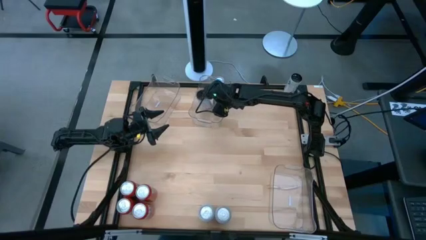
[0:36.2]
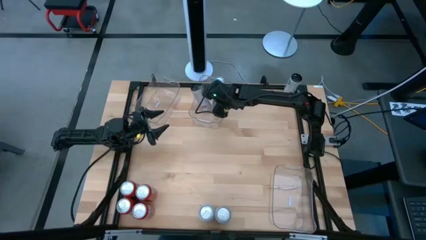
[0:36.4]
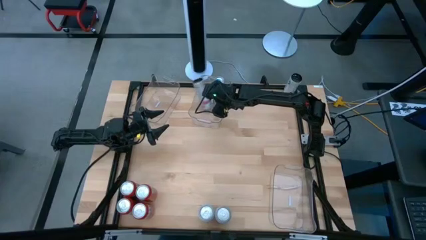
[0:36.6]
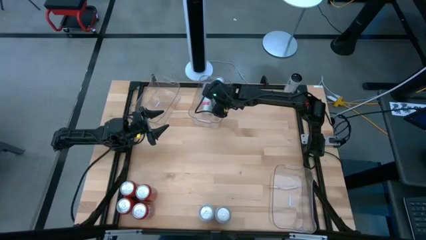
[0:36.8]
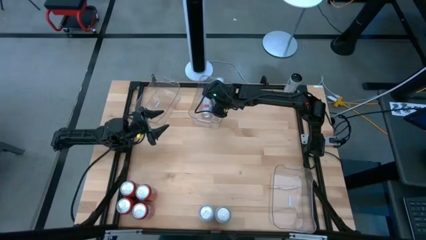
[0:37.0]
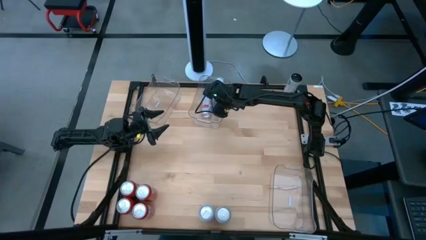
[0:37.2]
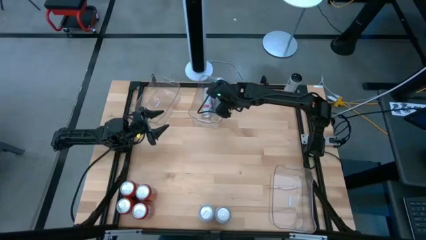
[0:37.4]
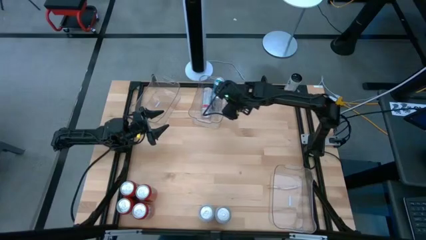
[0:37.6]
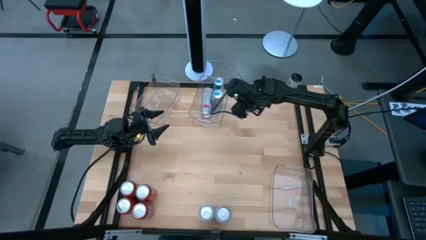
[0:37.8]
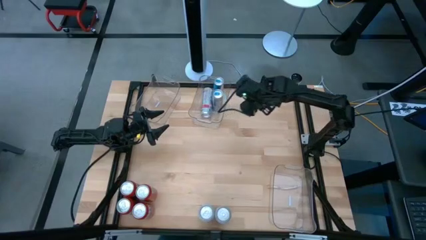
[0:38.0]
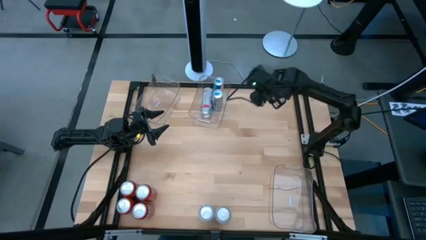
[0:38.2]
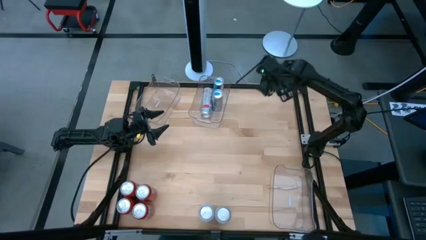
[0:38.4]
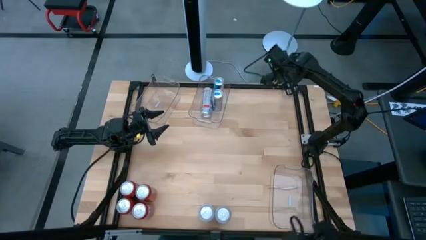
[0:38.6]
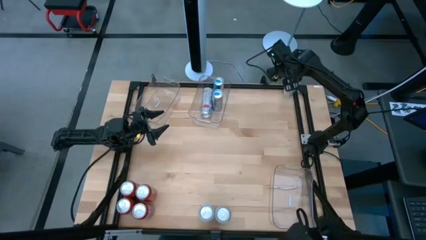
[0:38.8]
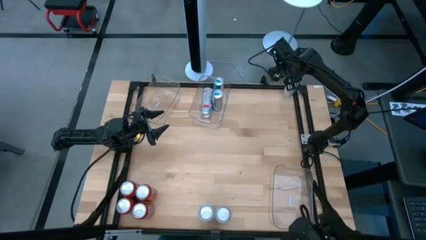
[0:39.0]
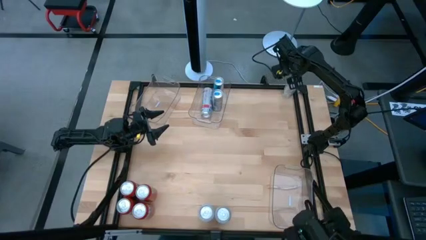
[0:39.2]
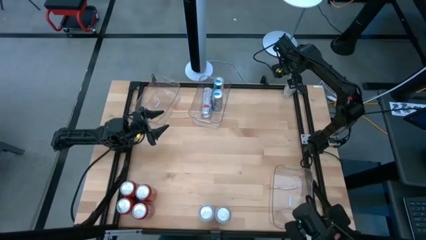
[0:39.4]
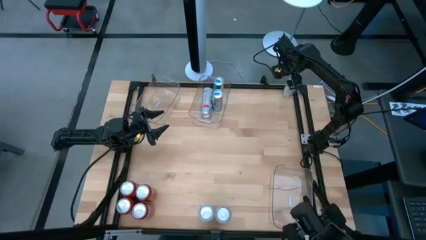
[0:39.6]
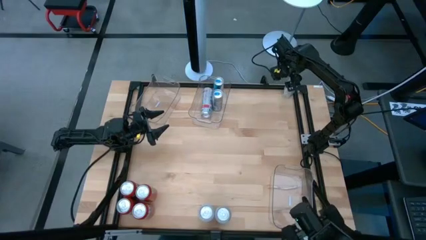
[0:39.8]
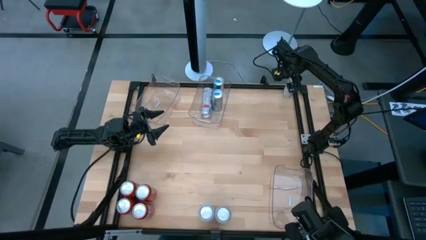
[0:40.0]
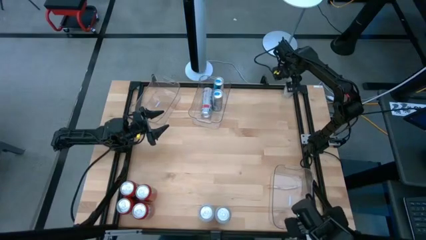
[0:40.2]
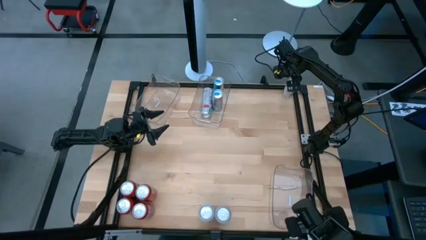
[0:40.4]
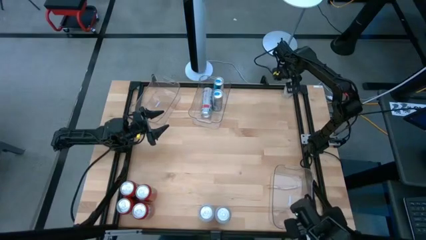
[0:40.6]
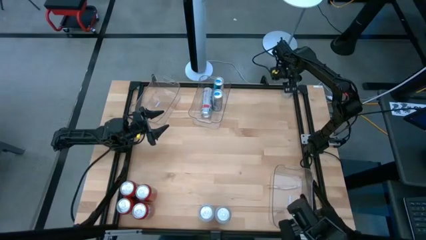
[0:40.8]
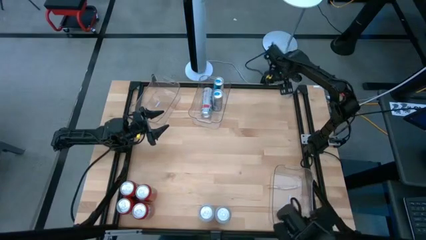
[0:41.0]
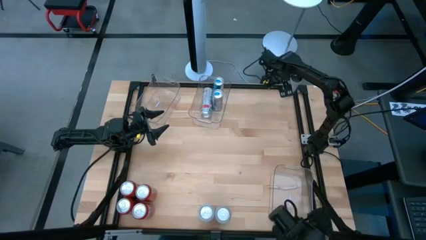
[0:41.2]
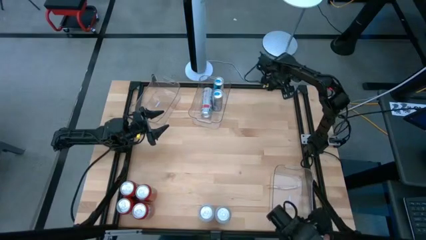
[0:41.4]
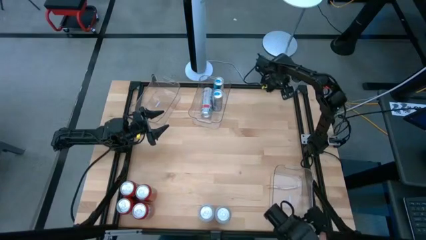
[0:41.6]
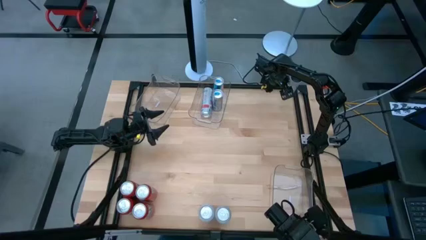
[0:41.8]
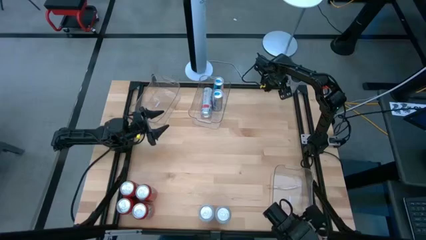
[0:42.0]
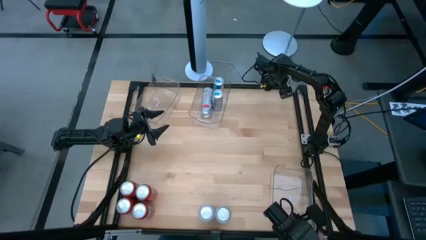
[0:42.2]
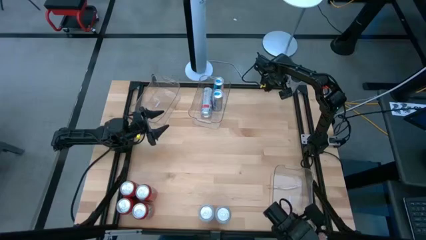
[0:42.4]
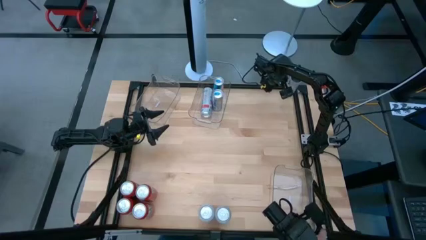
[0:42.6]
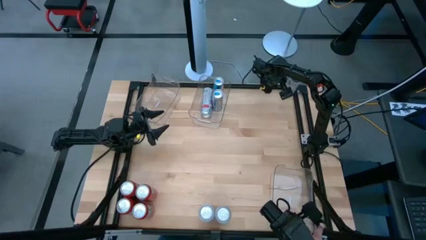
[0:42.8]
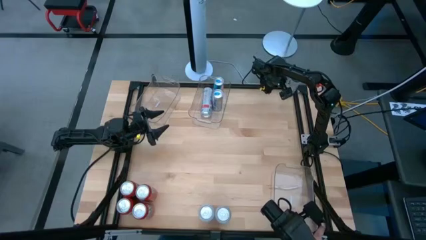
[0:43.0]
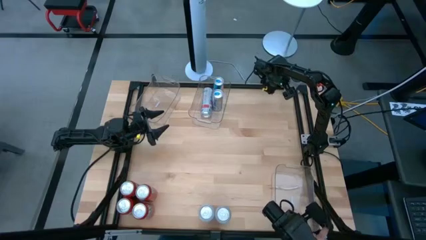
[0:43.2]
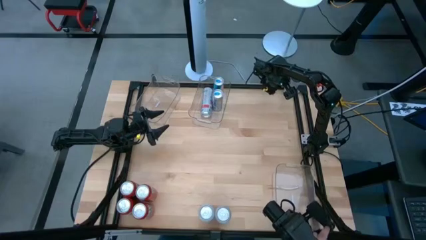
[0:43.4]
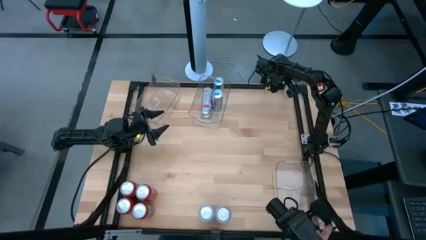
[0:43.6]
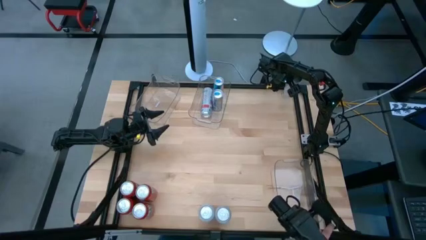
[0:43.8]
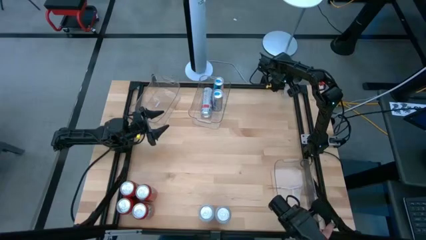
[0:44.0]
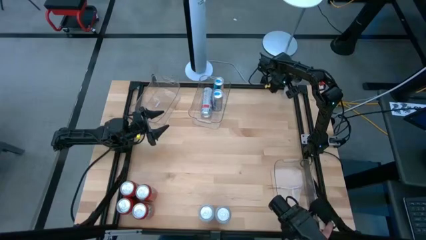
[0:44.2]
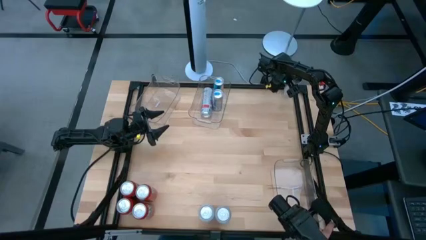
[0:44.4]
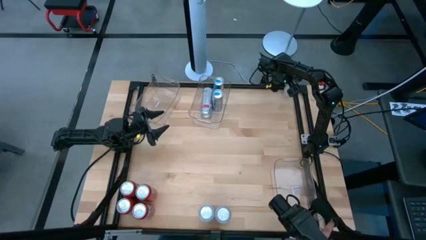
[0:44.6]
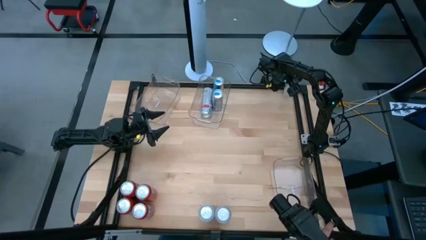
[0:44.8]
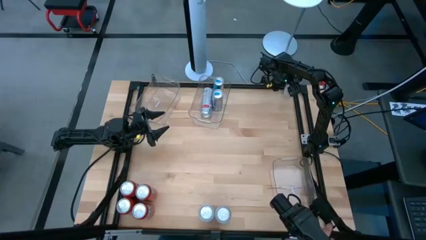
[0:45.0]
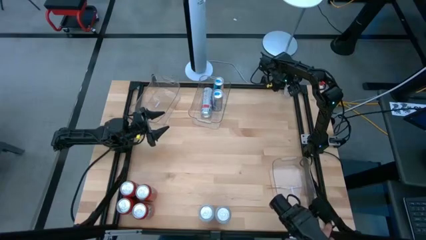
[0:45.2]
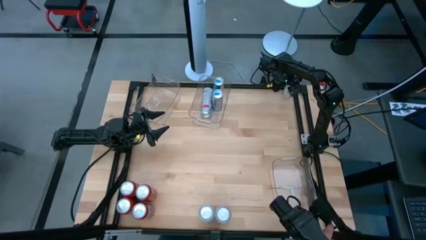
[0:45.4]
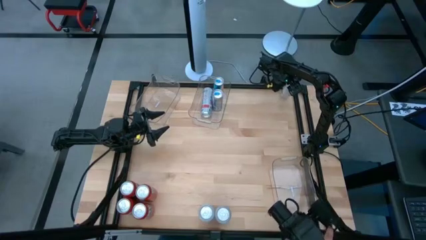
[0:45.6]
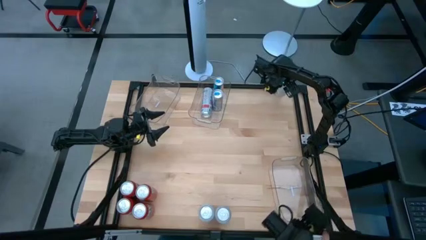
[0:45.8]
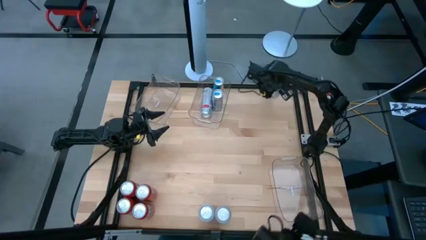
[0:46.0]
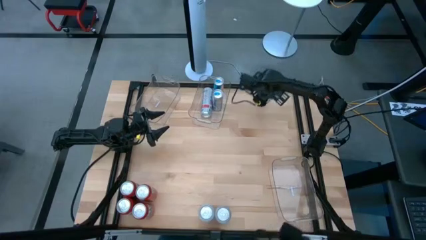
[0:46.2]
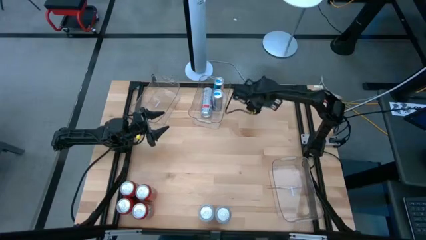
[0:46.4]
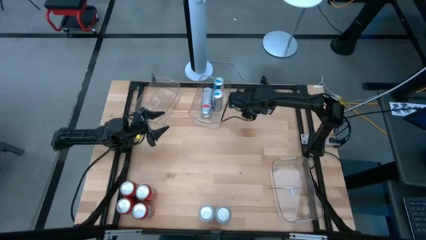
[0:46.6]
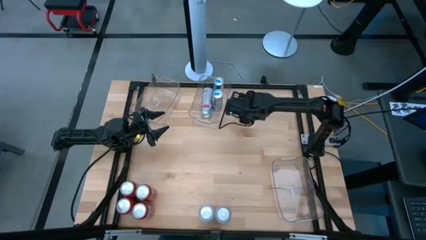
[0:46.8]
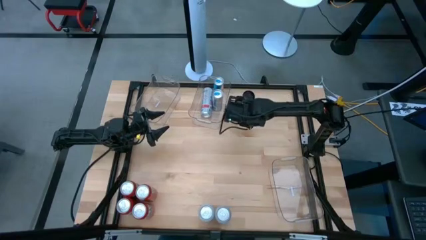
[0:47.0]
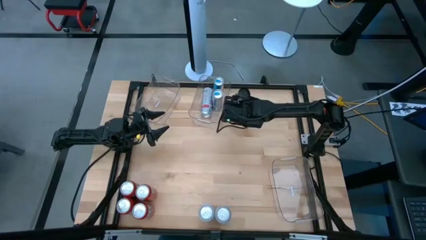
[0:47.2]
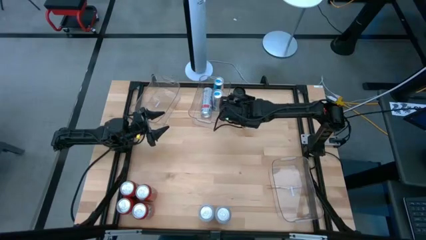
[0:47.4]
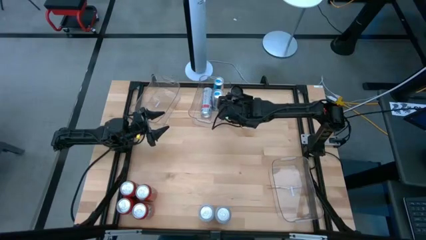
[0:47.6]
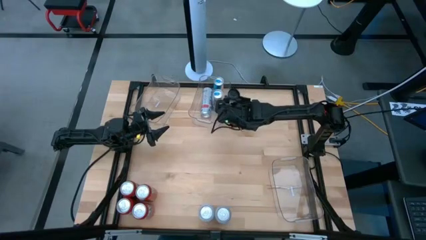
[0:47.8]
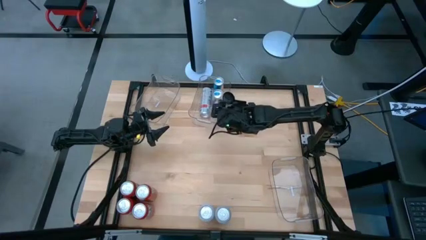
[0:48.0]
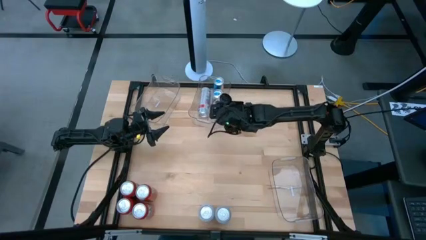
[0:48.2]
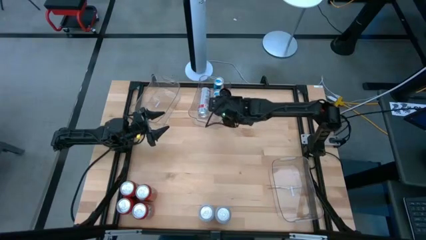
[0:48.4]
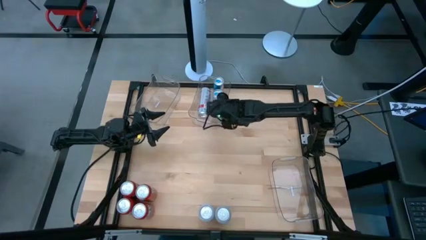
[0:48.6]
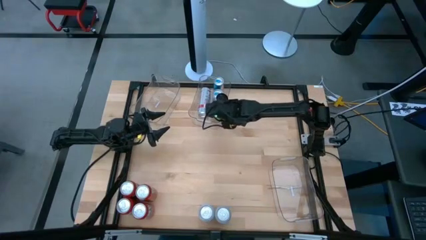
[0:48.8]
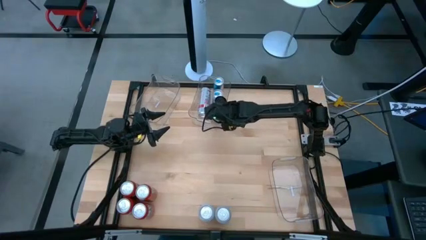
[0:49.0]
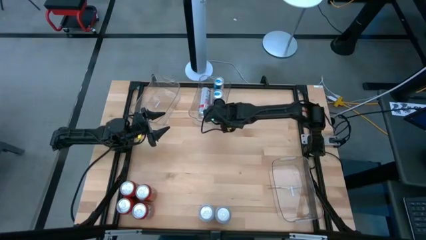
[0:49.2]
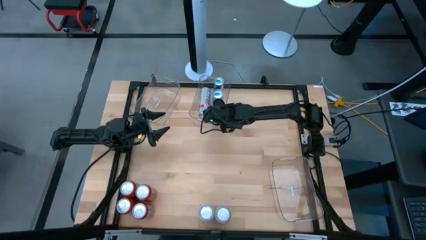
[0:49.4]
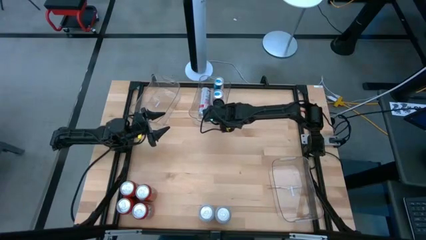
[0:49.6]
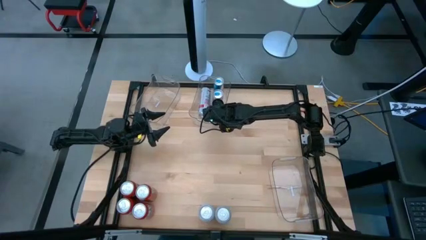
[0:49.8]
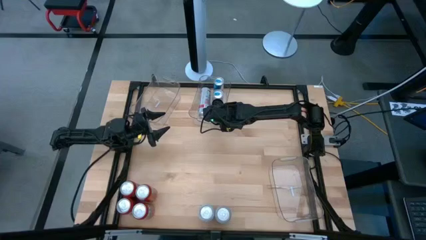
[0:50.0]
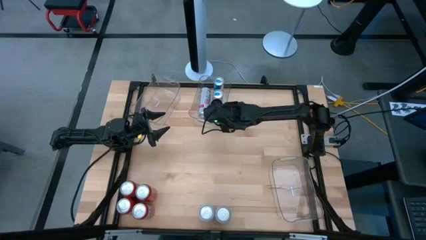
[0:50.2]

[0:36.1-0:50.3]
Task: Sort soda cans
Put the white pink soda can into the top middle transparent bin
